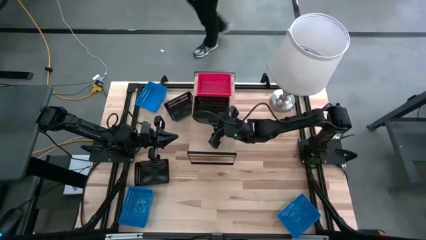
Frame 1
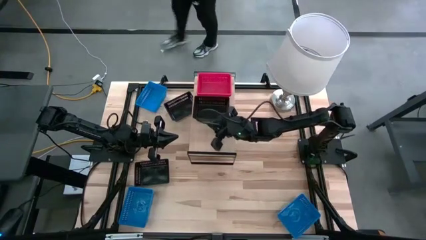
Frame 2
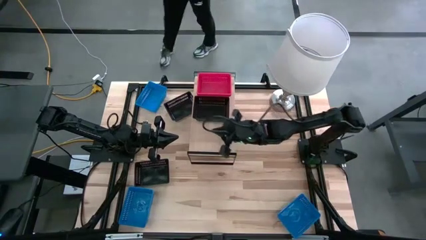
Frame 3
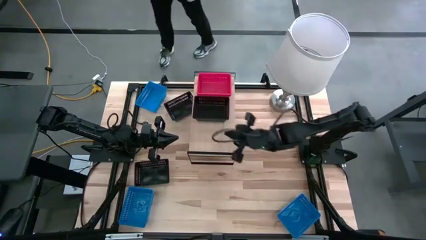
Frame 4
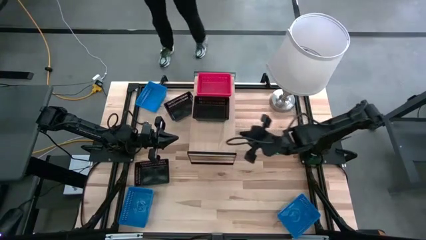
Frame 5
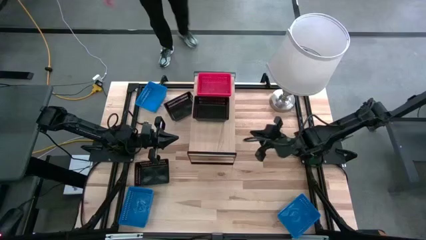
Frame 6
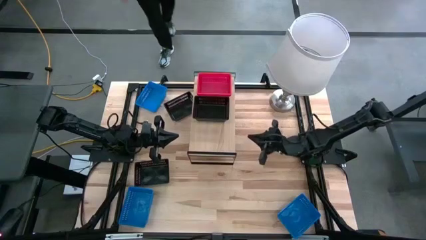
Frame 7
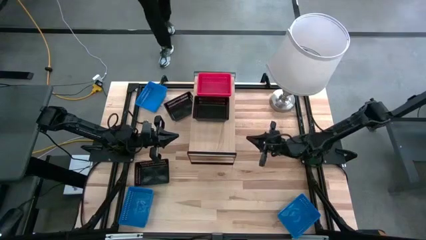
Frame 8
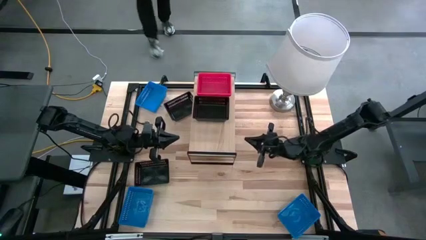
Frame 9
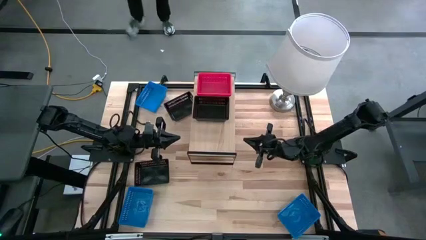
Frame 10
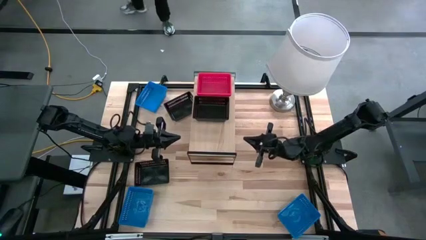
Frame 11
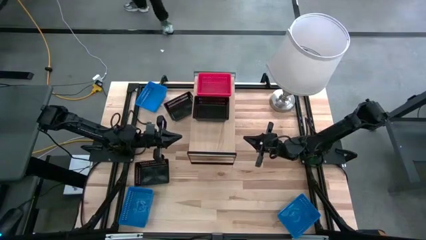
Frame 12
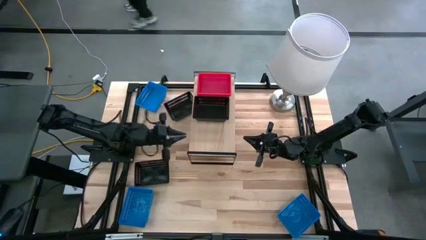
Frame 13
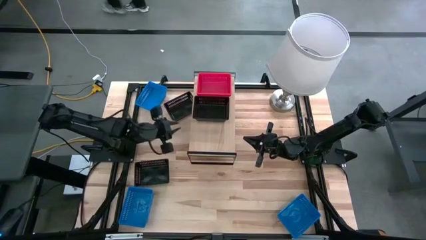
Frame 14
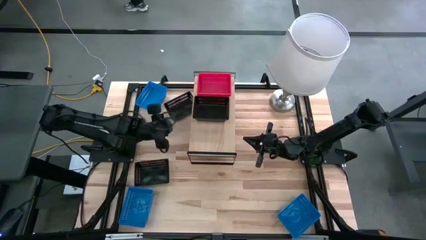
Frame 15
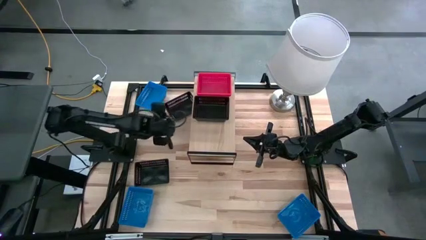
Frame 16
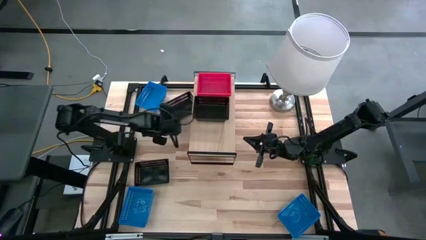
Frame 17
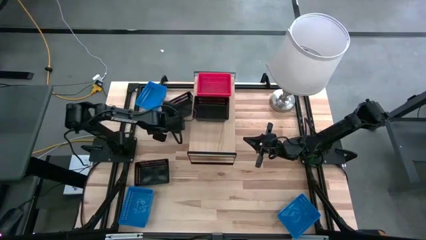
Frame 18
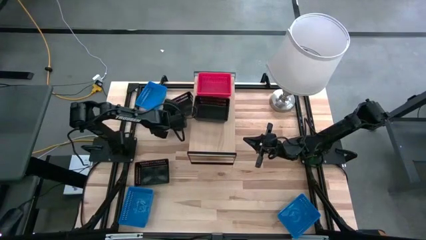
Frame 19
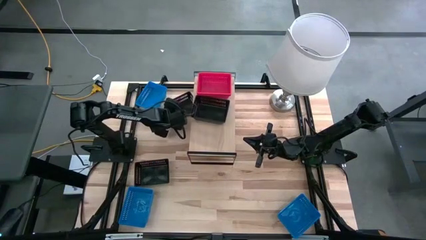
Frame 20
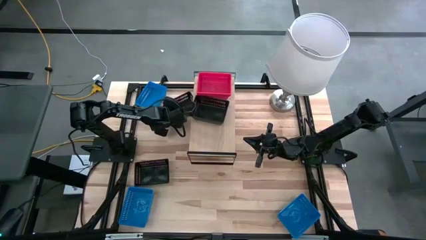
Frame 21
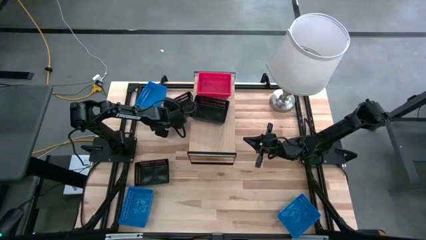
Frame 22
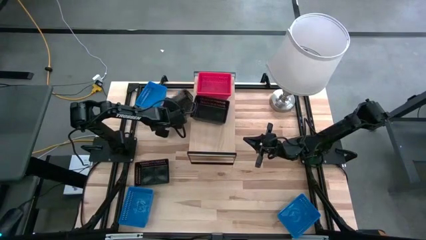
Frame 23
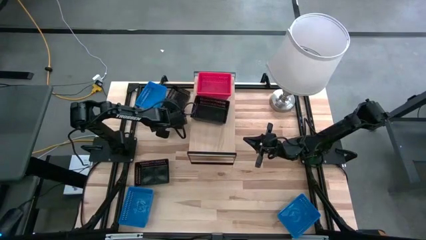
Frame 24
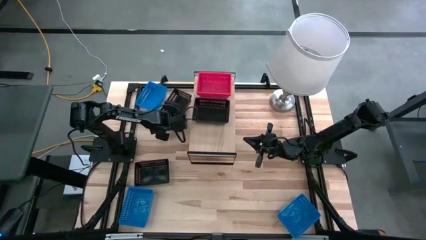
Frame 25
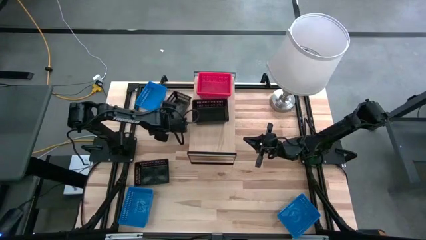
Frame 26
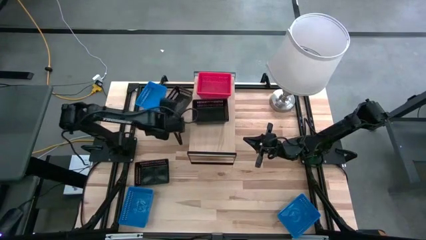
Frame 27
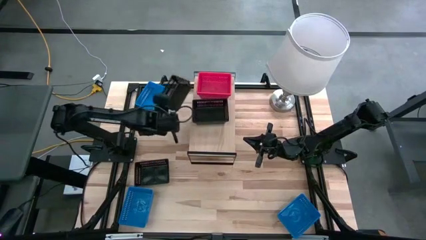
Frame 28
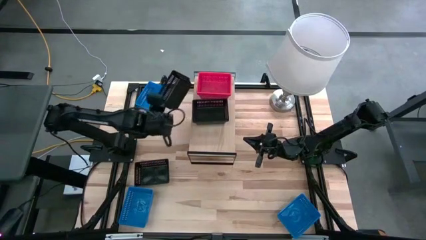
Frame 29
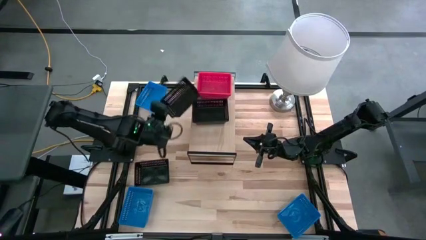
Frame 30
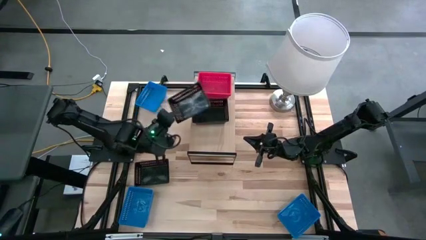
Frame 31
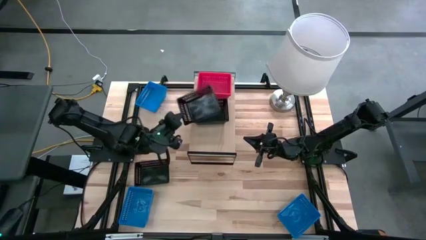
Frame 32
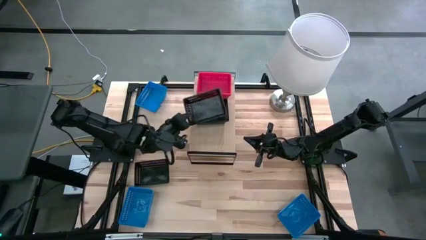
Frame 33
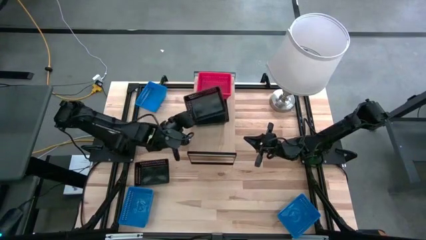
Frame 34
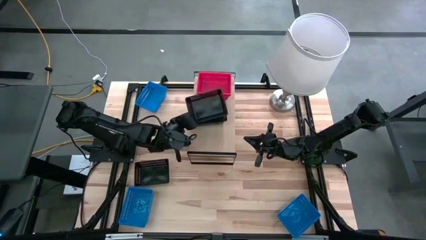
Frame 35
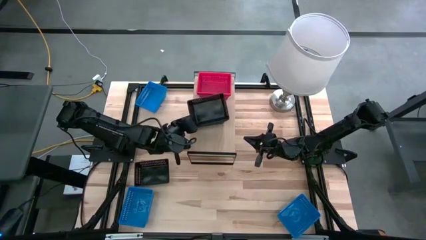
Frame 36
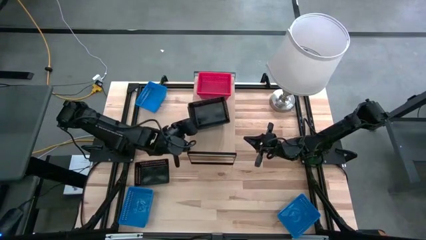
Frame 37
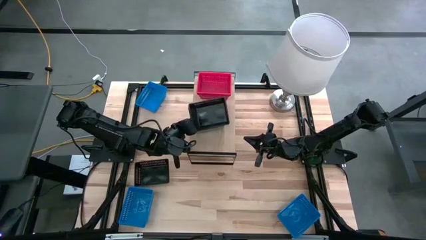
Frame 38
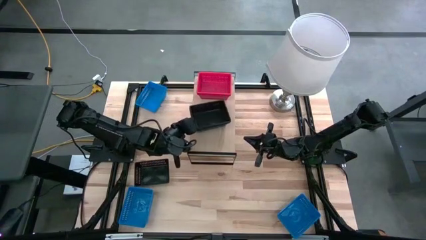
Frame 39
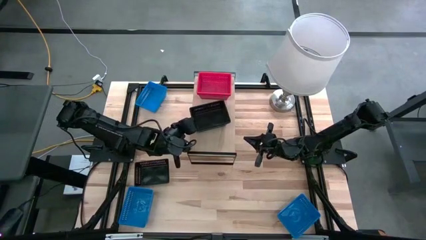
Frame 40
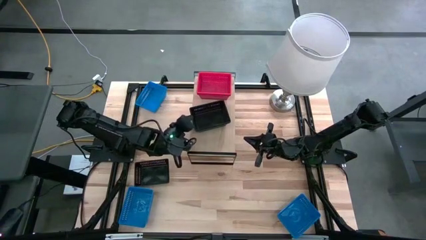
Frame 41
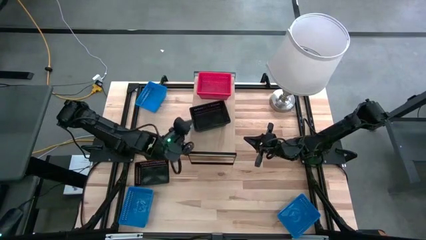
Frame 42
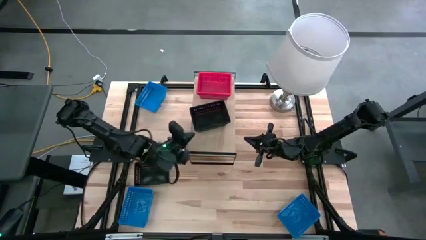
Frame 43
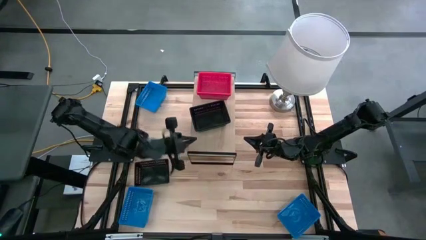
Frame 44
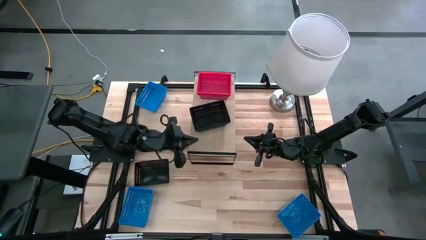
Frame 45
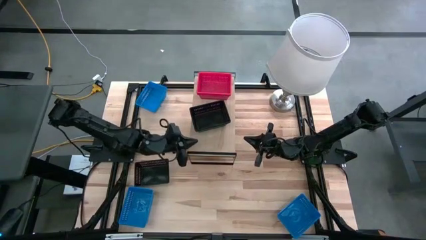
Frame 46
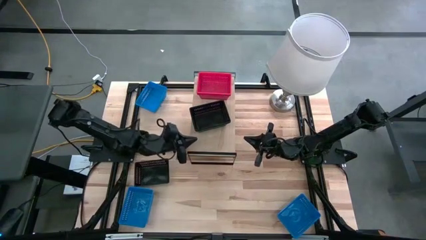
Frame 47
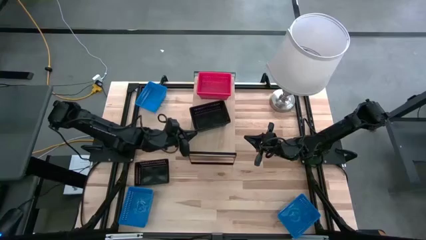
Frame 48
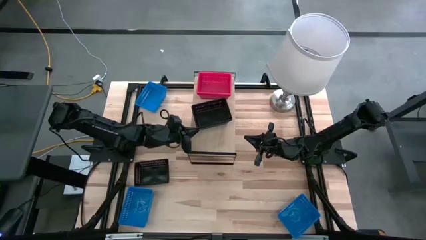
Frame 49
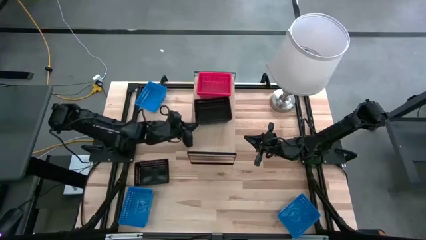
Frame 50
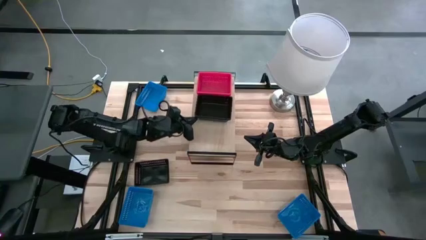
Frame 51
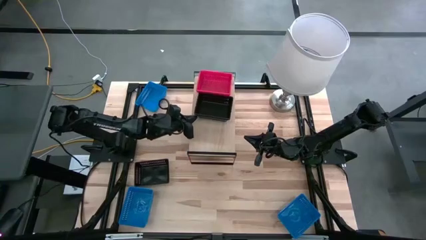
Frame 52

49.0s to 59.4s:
Task: Stack baskets on shelf by color
Stack the top black bin on top of the black bin on the shelf

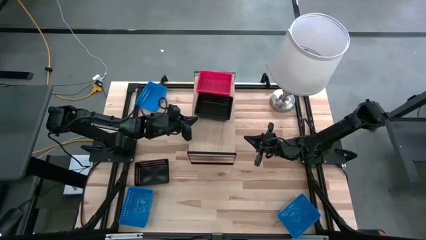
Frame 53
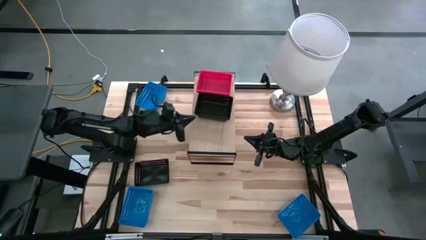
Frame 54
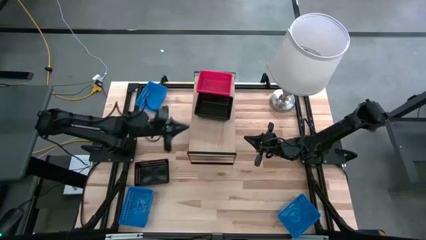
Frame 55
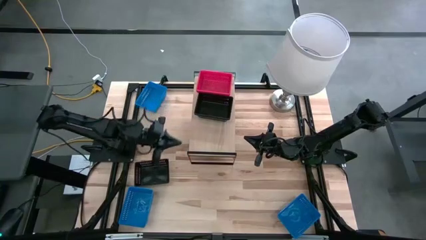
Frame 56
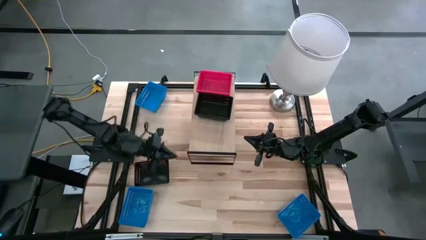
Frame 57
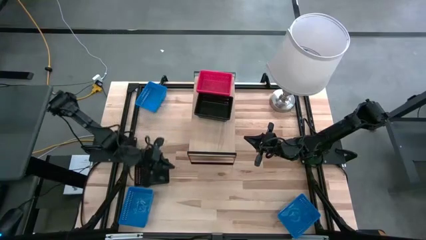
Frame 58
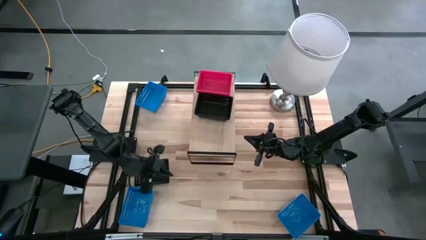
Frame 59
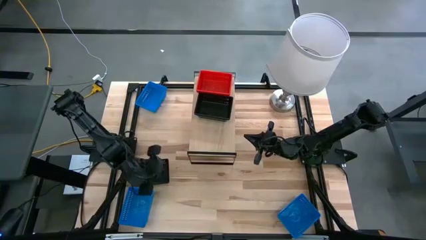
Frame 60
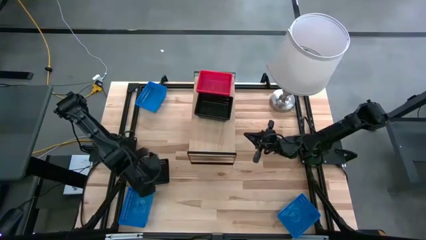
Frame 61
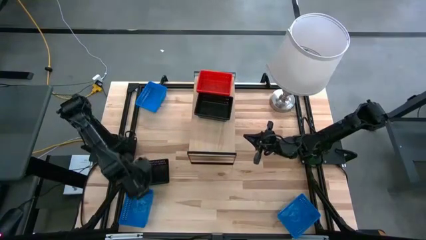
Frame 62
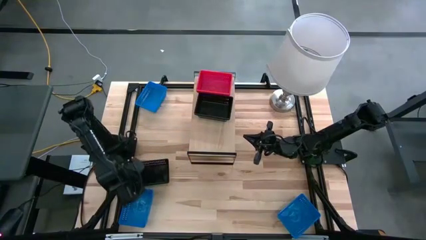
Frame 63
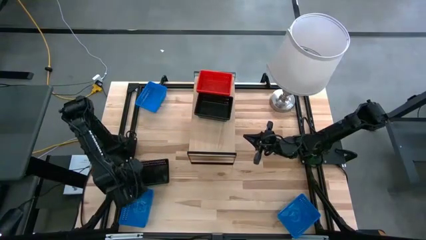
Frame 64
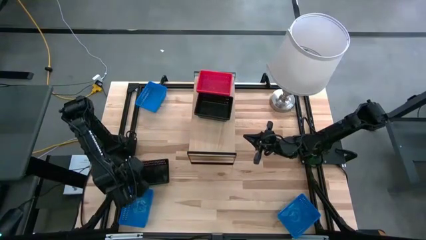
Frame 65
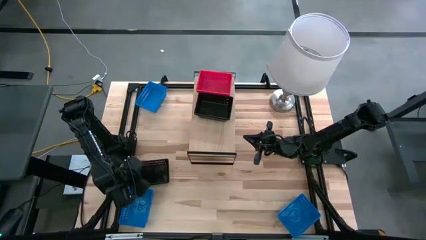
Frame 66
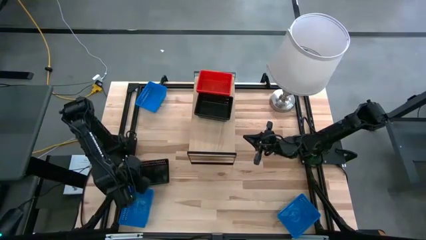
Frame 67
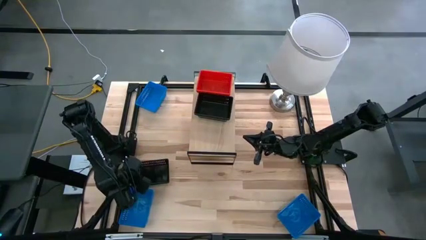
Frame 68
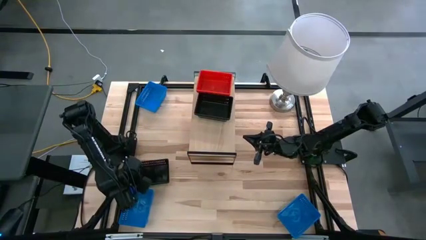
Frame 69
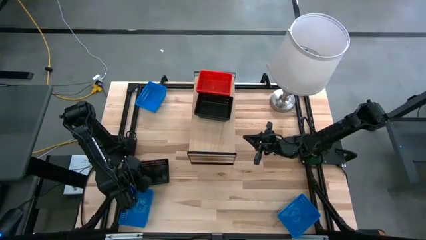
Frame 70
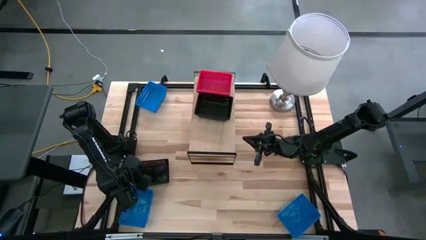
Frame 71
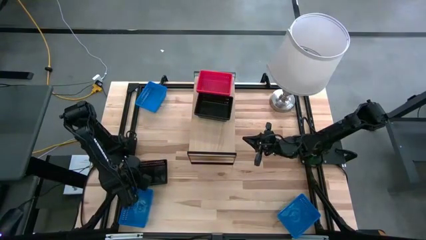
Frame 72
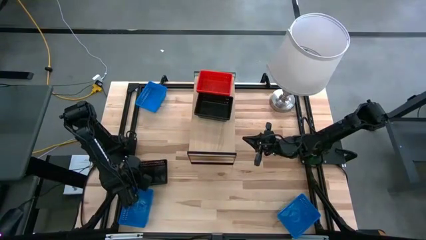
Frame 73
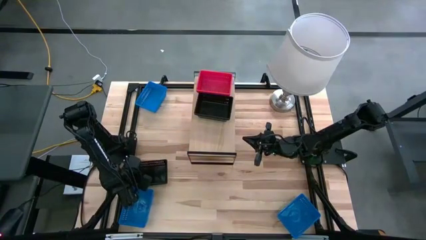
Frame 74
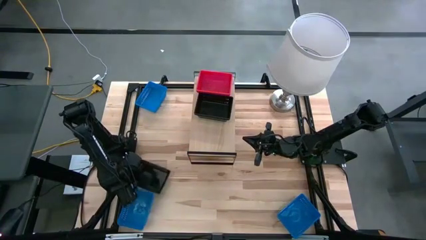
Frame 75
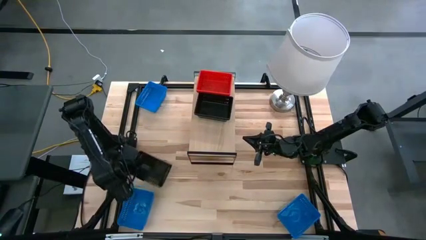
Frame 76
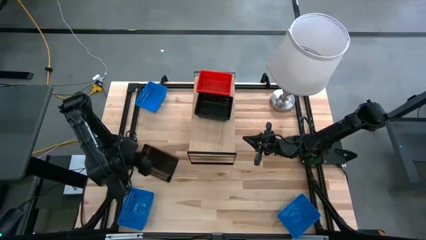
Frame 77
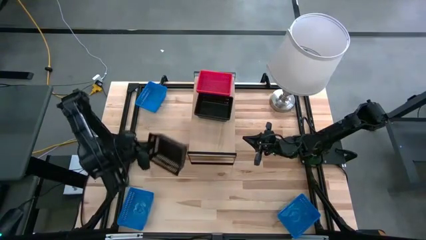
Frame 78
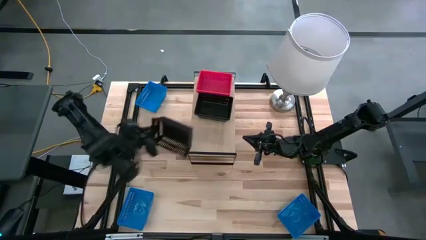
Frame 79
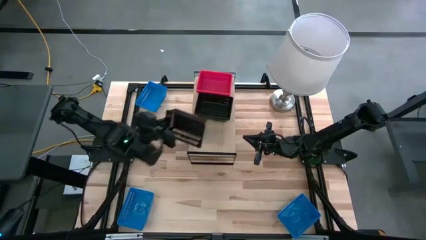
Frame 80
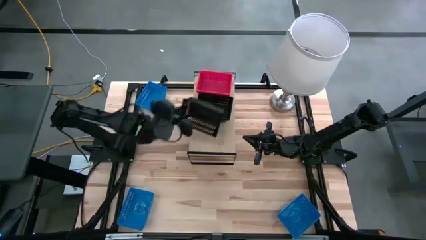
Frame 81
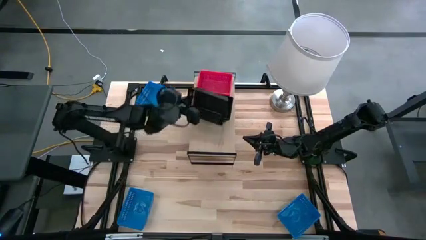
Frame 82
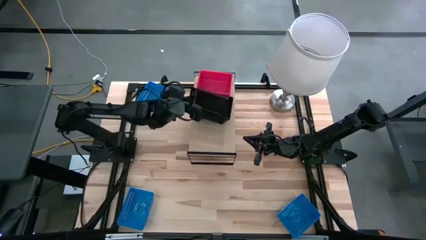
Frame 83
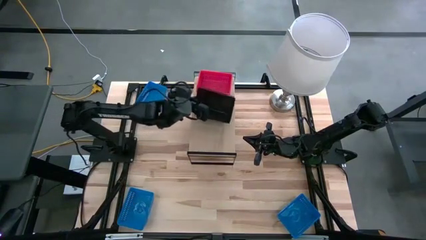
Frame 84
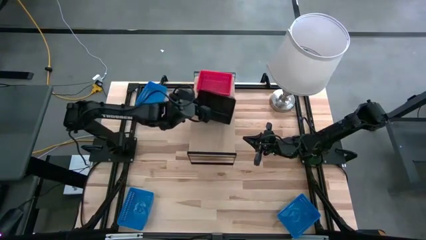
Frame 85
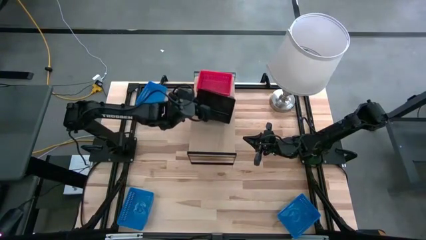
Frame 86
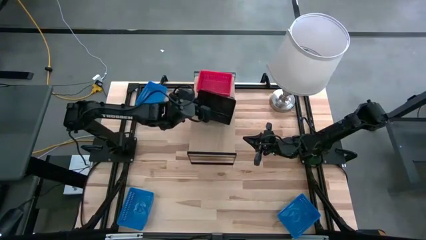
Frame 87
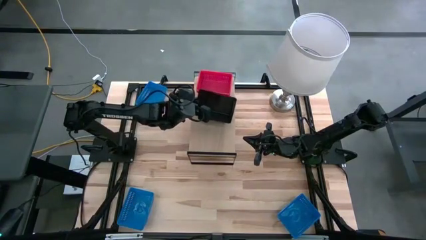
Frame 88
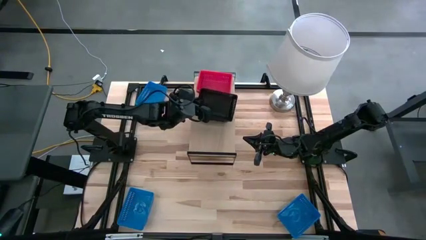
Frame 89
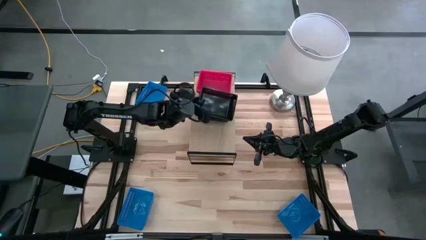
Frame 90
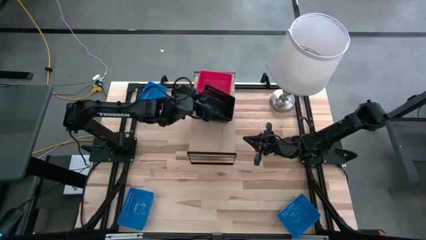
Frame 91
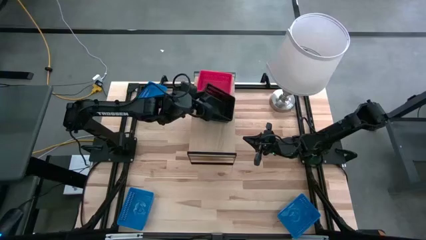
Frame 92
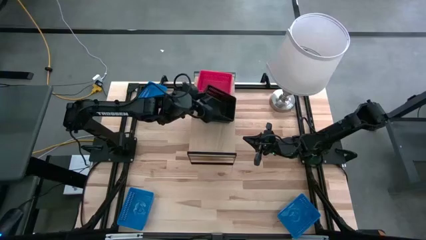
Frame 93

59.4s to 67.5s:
Stack the black bin on top of the black bin on the shelf
